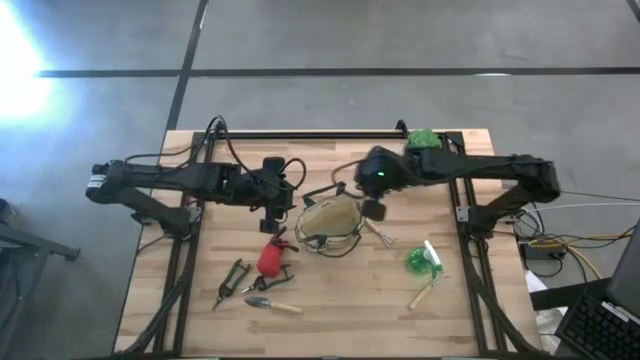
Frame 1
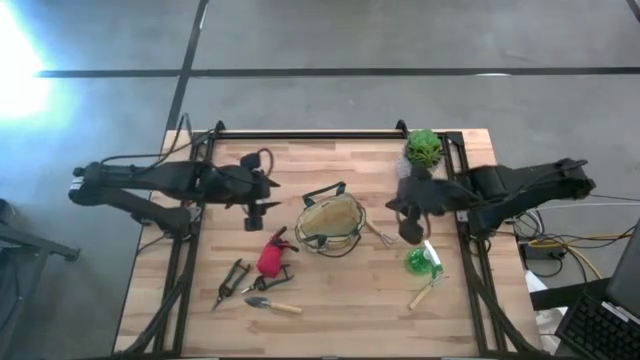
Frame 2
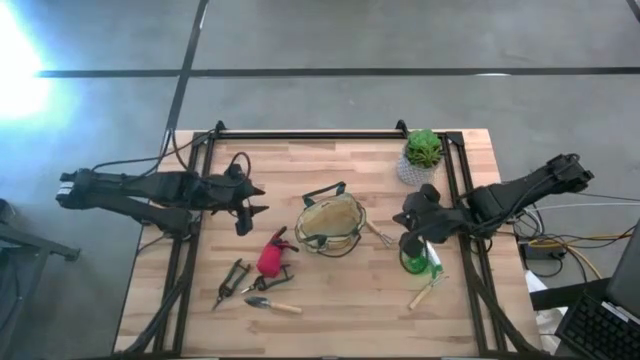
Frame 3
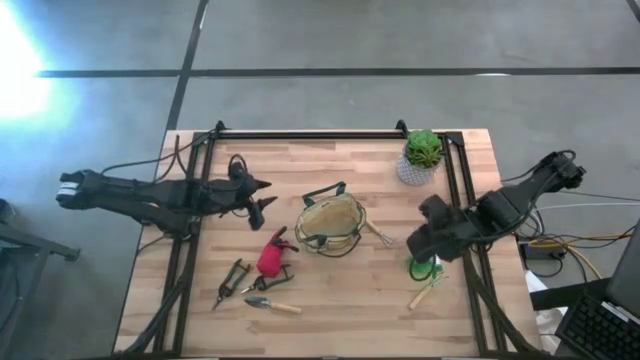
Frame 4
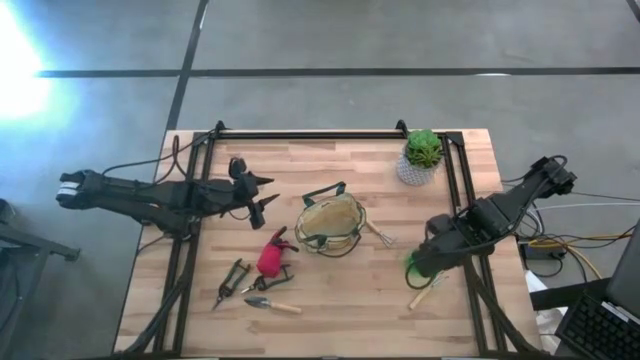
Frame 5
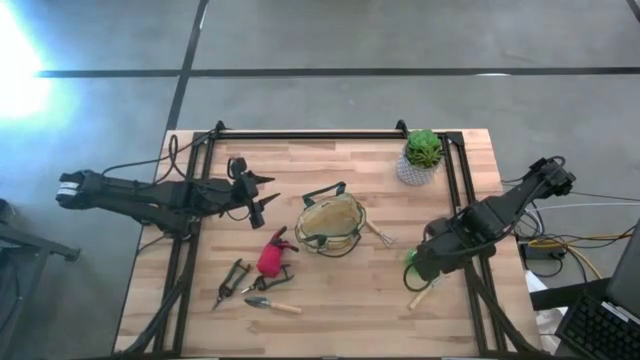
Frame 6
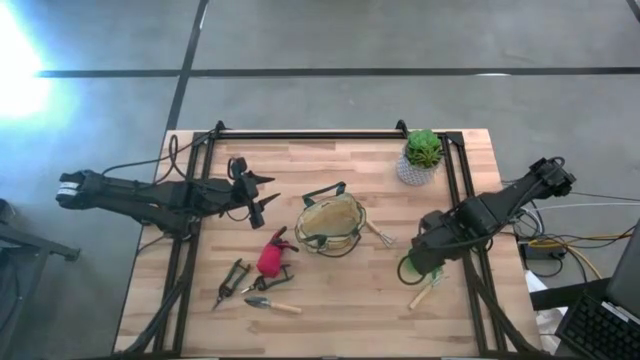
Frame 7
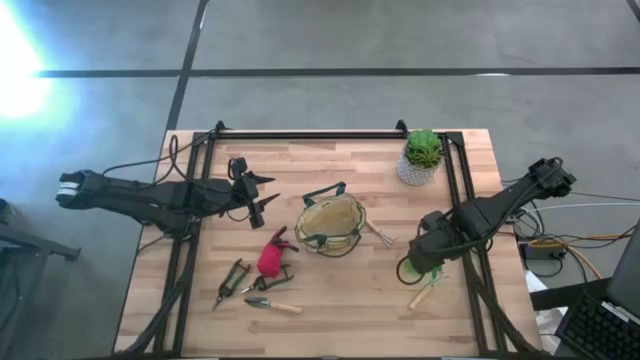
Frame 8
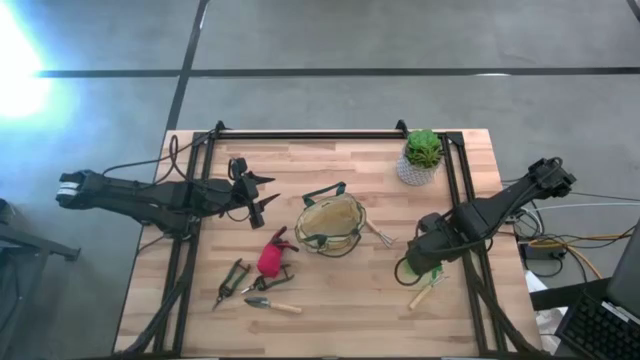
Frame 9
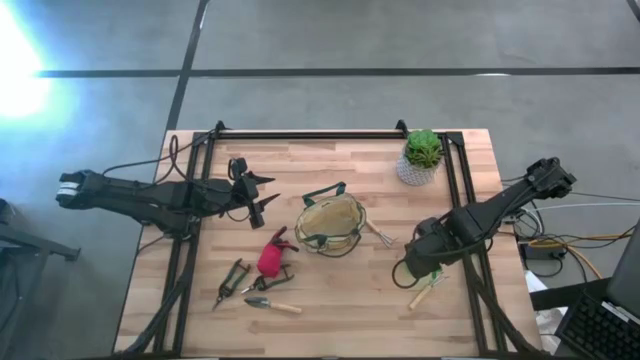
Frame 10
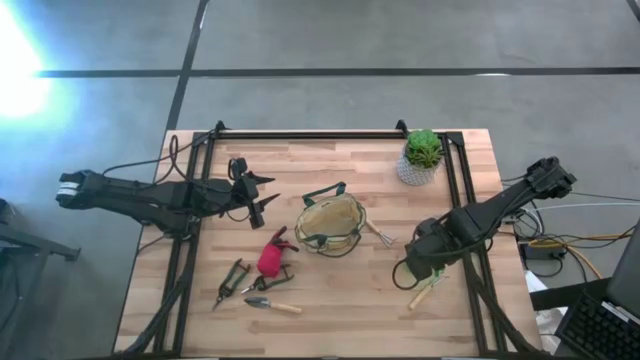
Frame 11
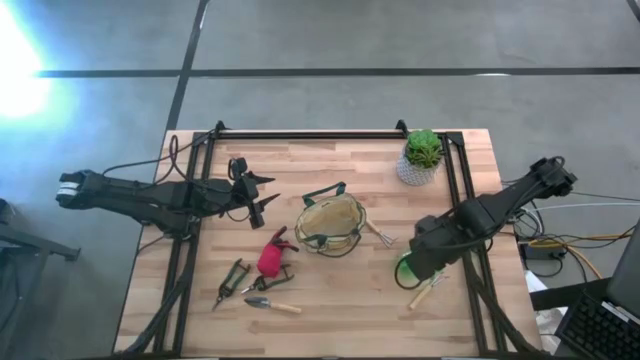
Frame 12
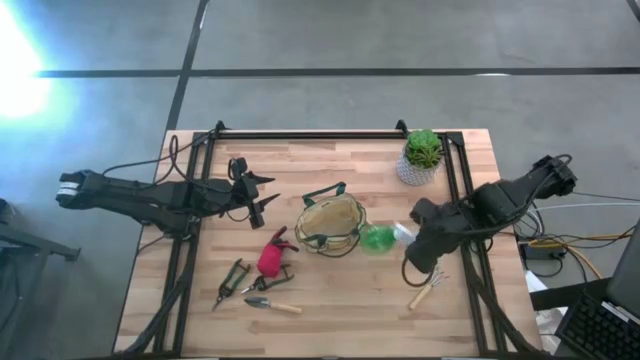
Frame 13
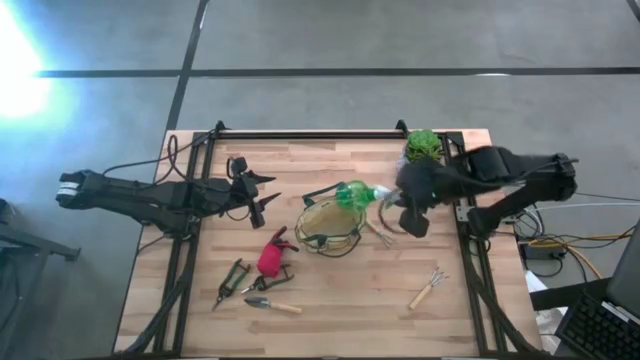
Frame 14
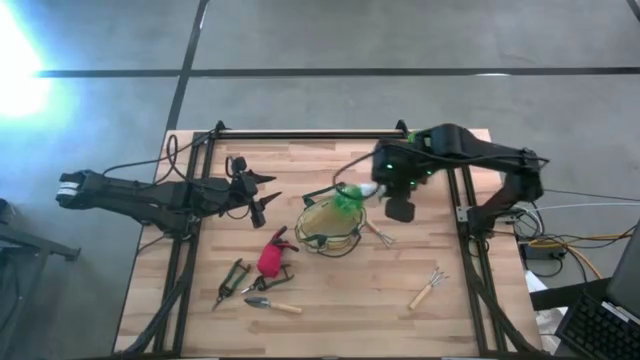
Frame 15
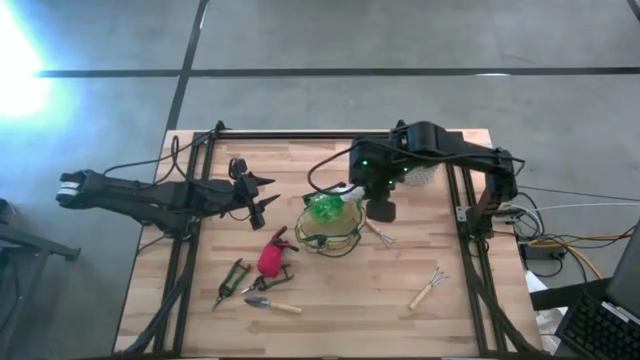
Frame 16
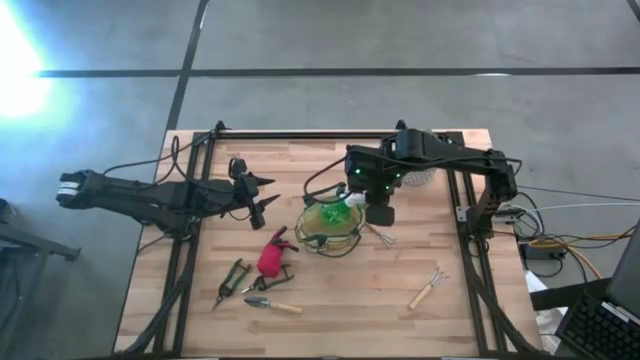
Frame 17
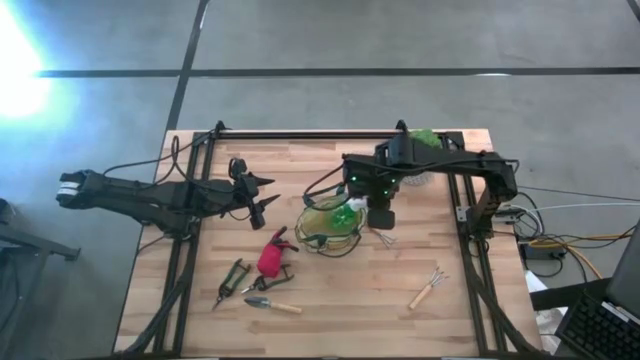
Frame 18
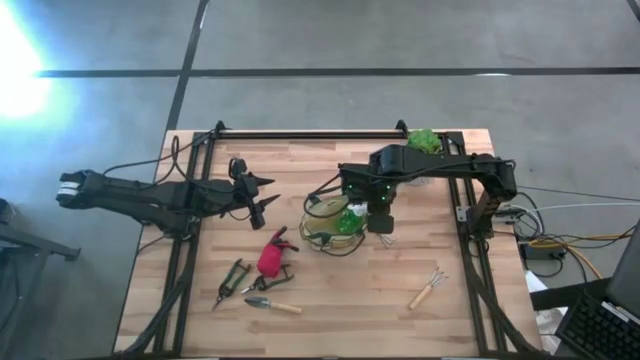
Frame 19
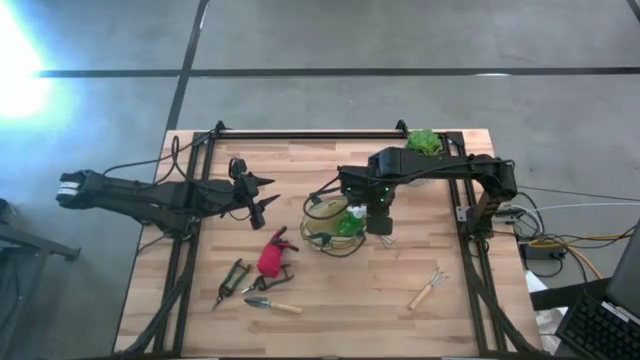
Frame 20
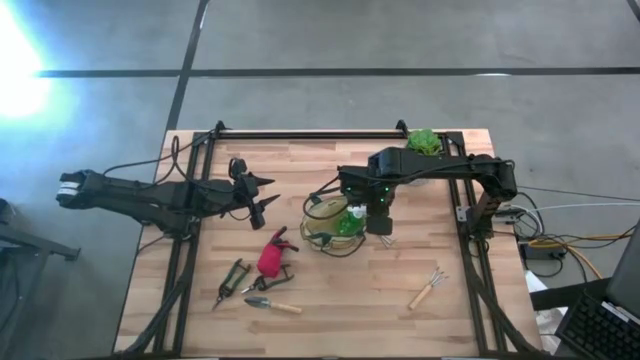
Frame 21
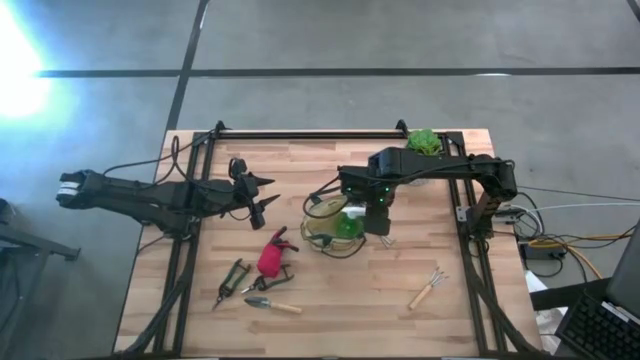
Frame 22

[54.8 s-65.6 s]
Task: Pick & Place Garden tools in Gardening bag
Put the green spray bottle into the light brown gardening bag

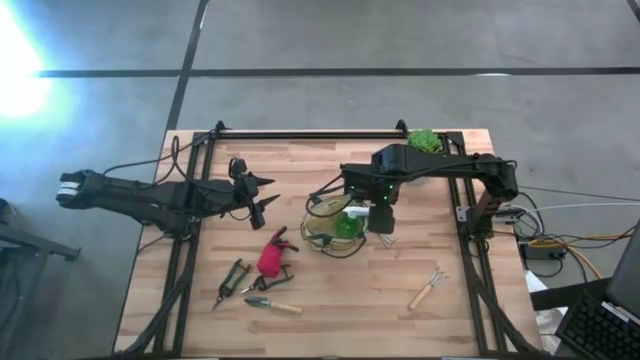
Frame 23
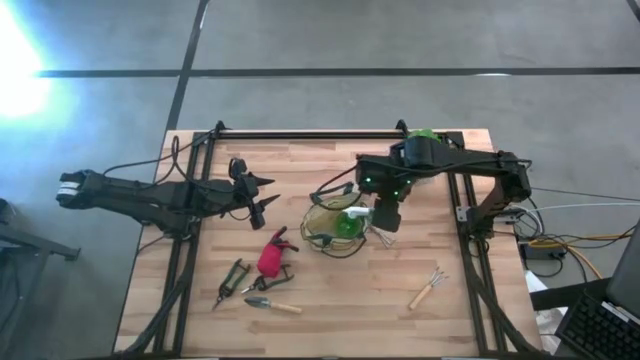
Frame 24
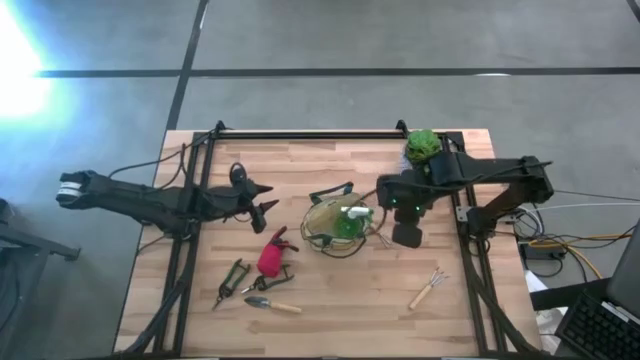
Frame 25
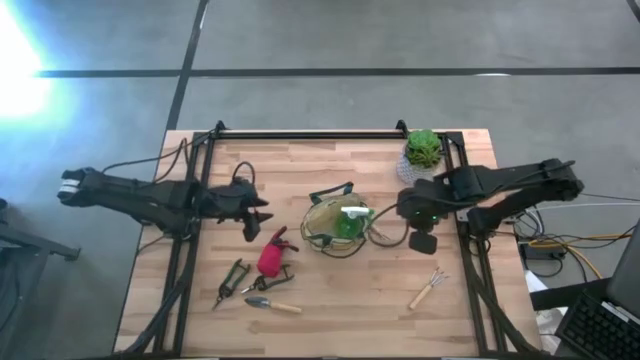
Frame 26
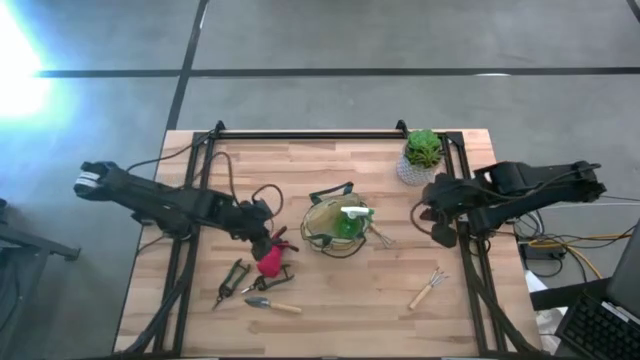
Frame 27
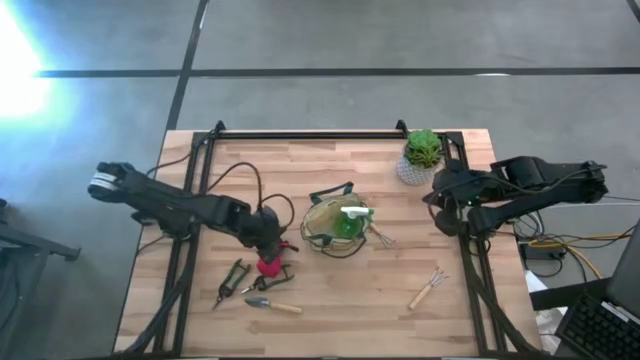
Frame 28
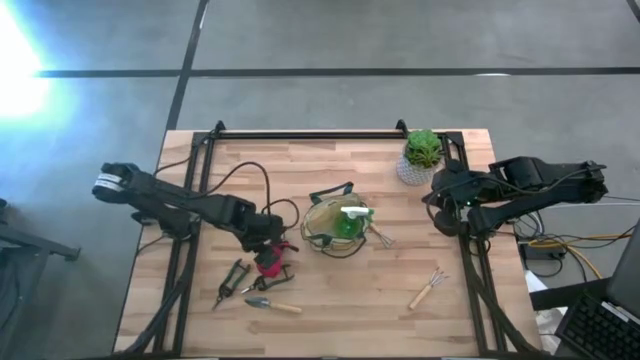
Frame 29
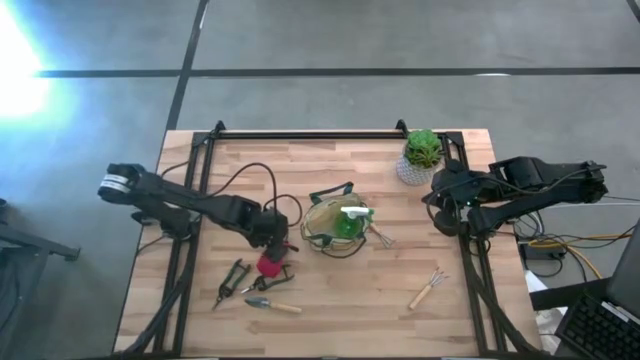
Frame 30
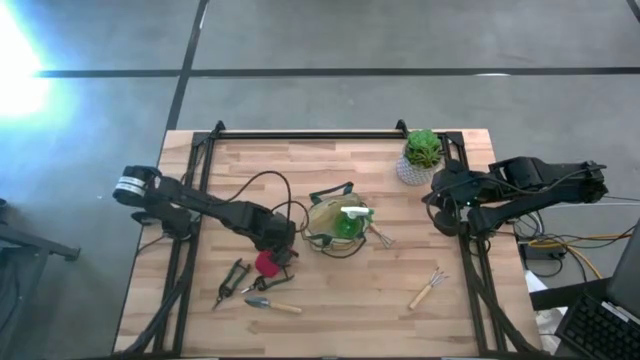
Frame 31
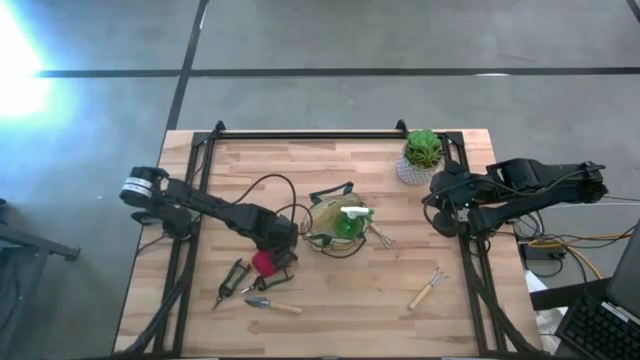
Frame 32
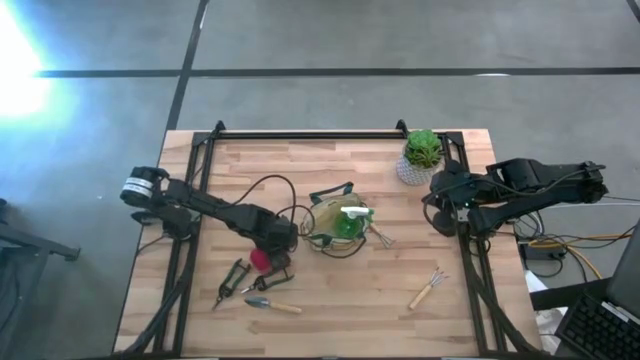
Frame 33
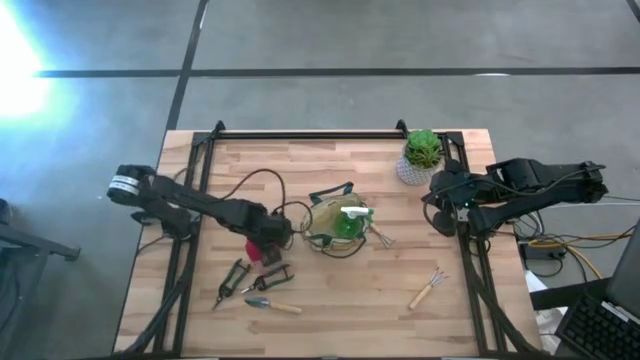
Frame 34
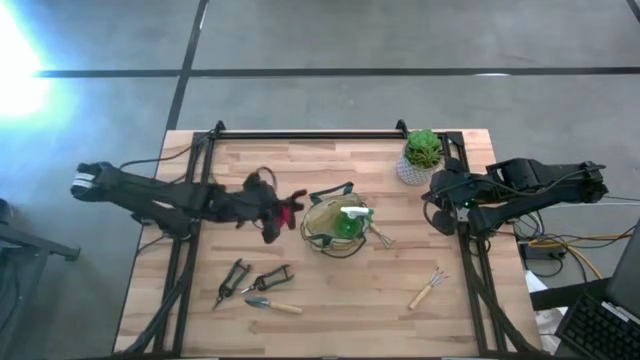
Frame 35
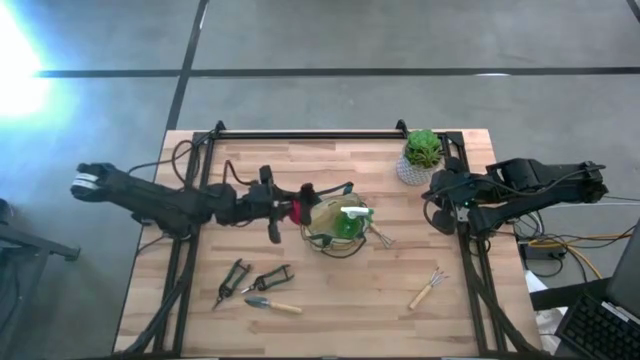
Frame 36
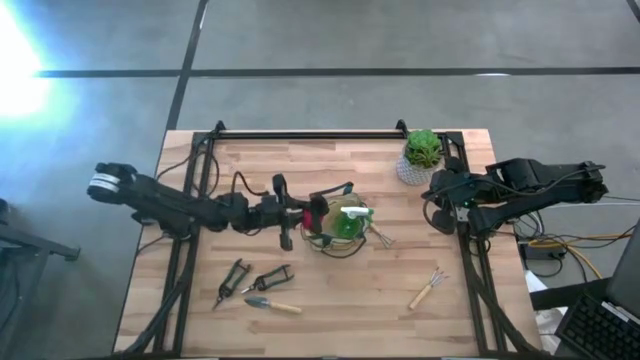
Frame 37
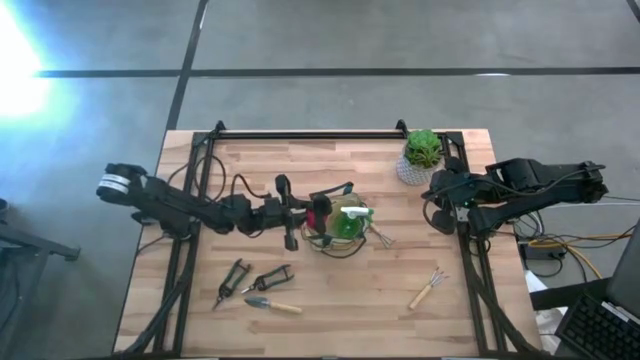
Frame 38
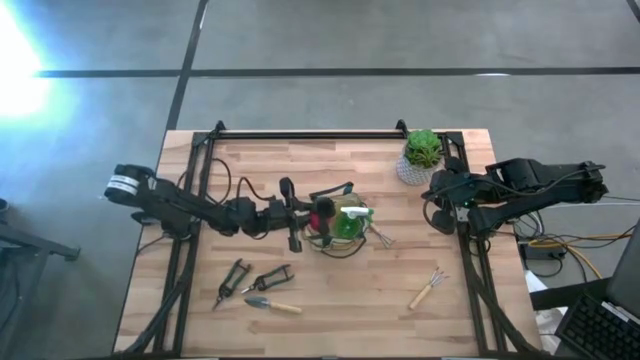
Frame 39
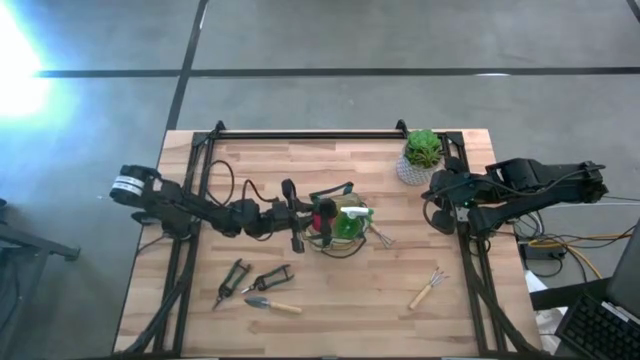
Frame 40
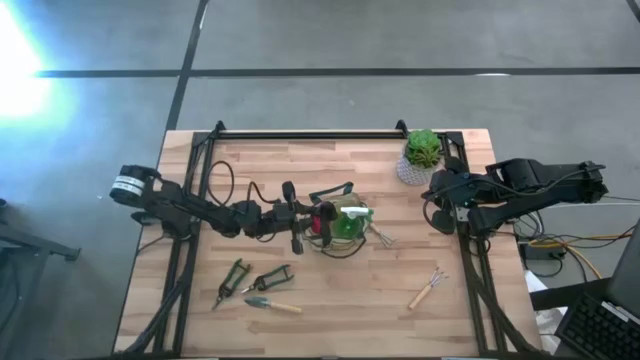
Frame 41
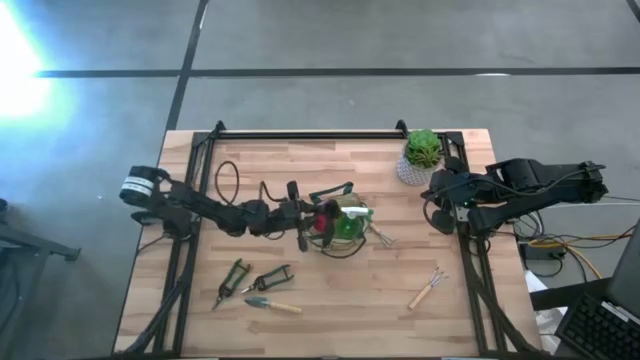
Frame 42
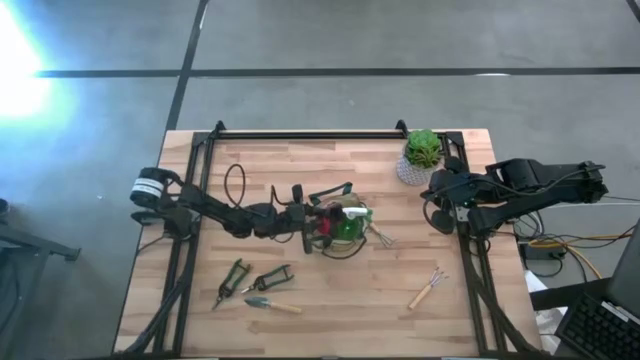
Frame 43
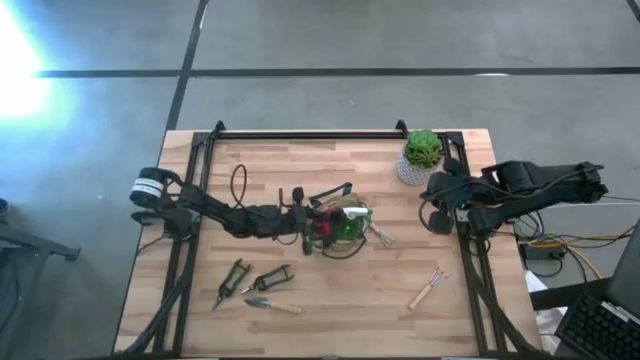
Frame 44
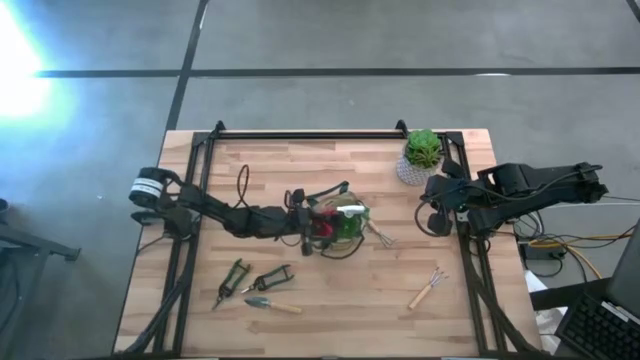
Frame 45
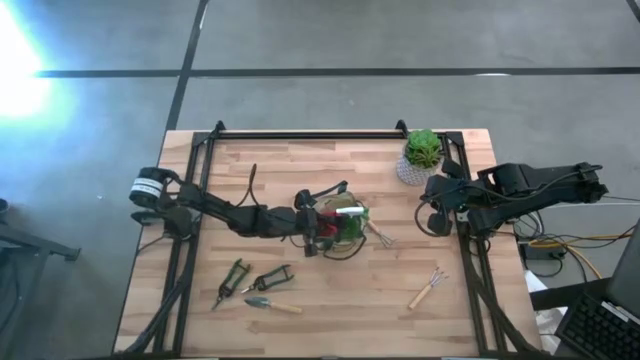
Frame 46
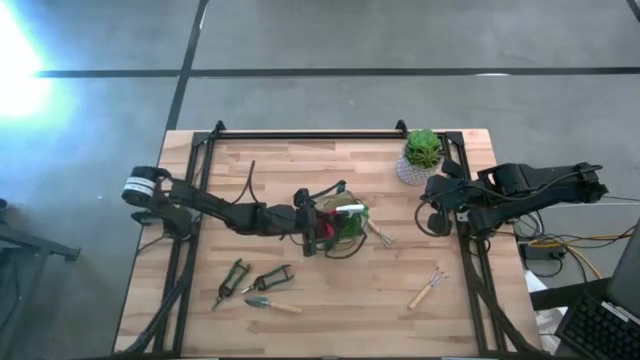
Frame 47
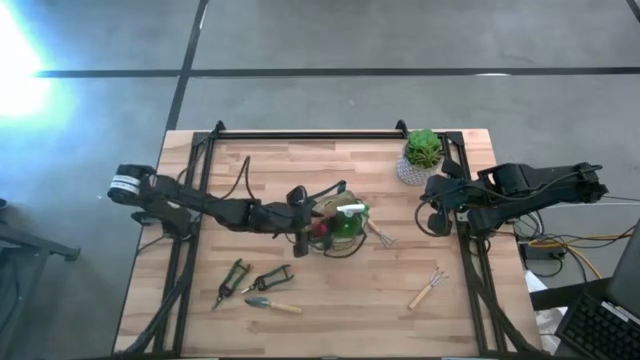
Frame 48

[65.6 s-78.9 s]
Put the red gloves into the light brown gardening bag
